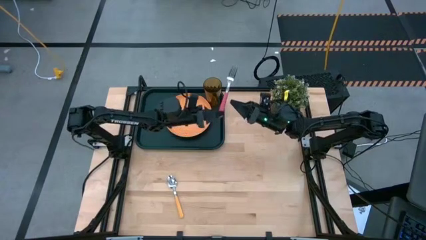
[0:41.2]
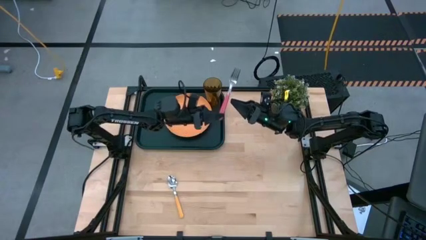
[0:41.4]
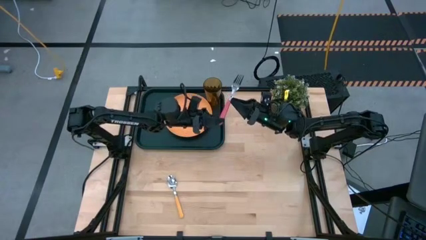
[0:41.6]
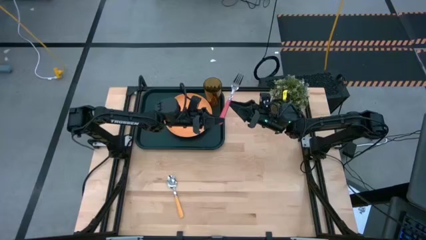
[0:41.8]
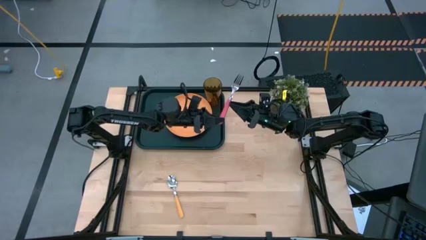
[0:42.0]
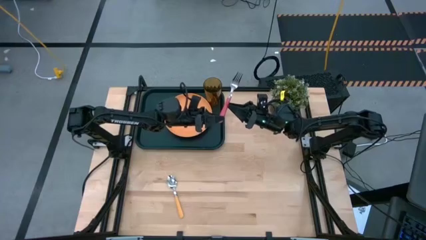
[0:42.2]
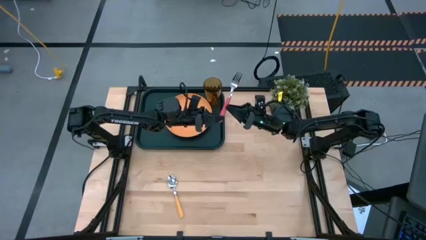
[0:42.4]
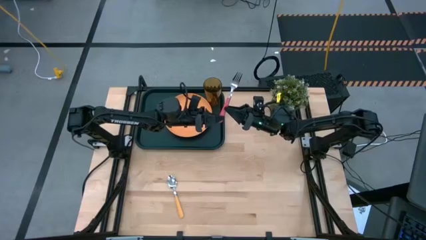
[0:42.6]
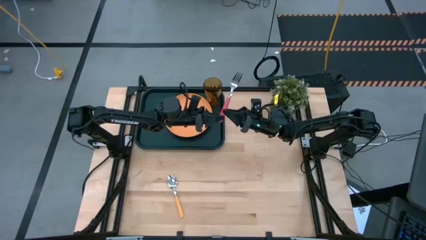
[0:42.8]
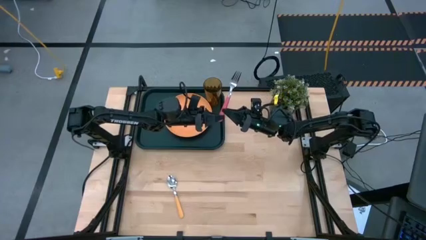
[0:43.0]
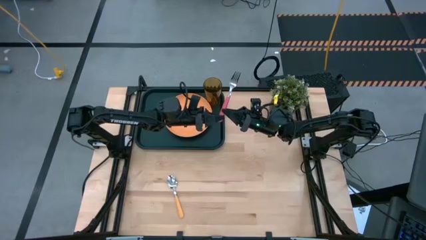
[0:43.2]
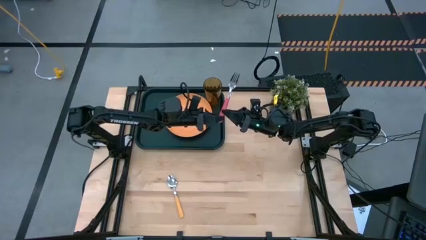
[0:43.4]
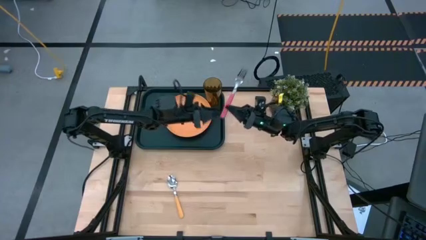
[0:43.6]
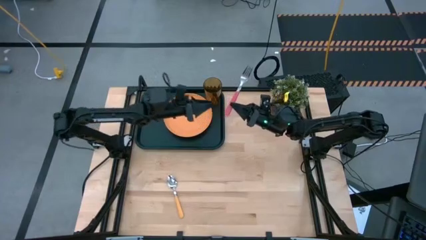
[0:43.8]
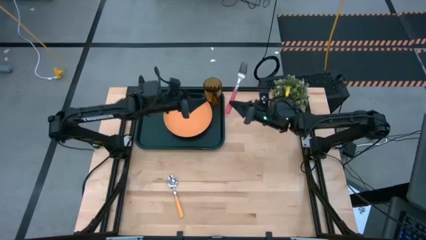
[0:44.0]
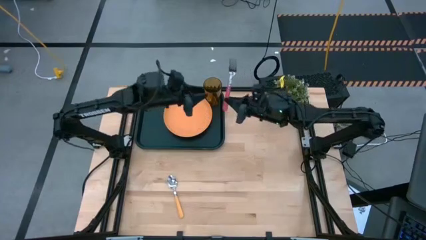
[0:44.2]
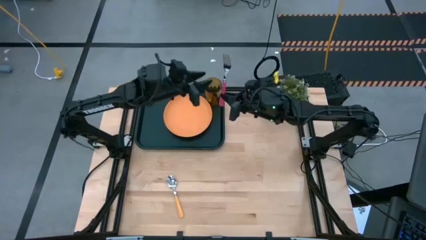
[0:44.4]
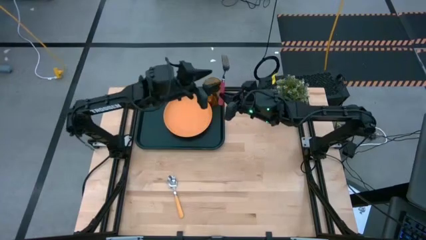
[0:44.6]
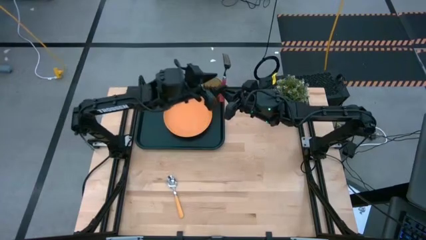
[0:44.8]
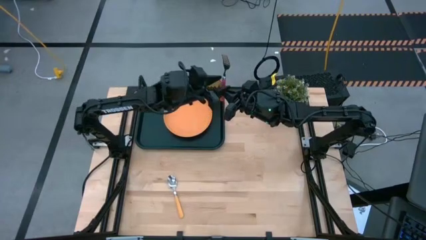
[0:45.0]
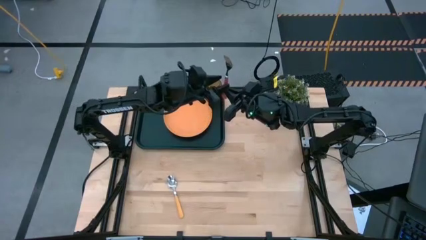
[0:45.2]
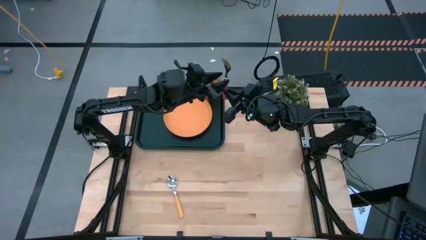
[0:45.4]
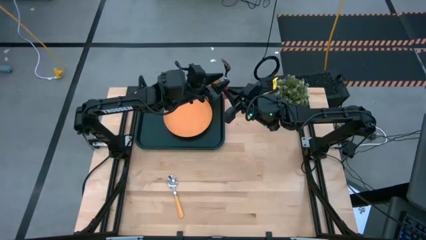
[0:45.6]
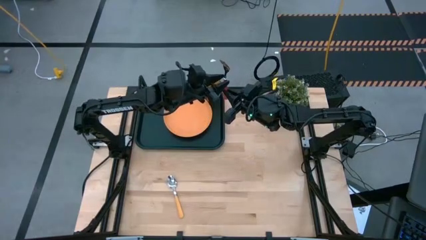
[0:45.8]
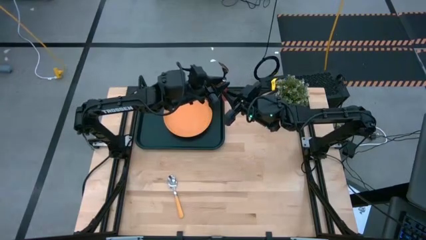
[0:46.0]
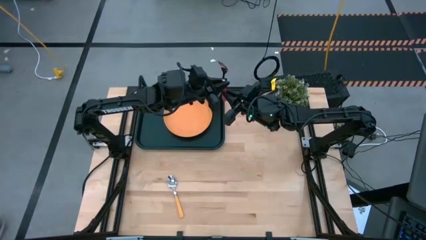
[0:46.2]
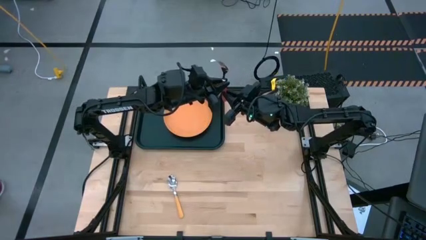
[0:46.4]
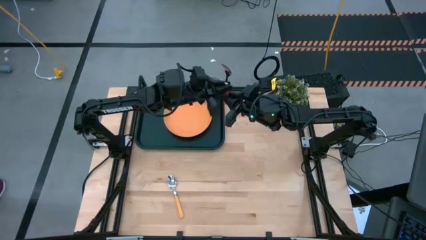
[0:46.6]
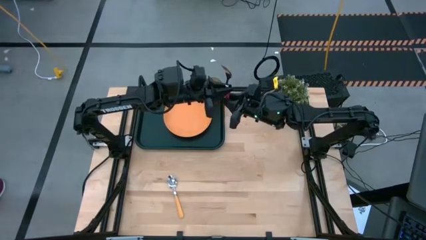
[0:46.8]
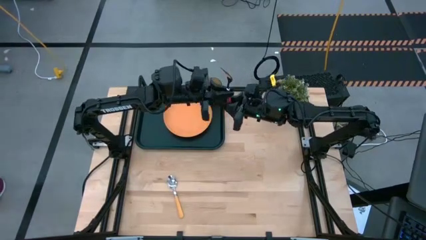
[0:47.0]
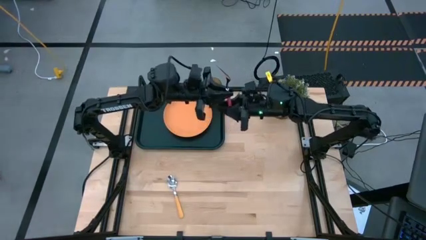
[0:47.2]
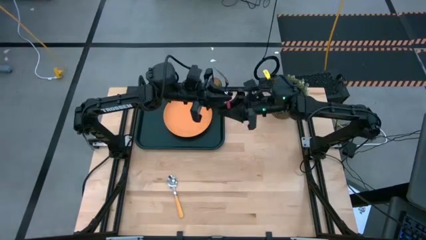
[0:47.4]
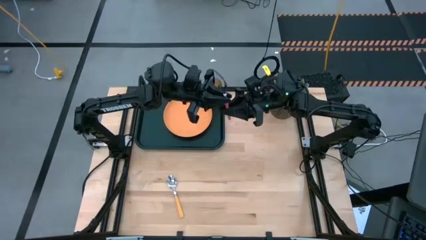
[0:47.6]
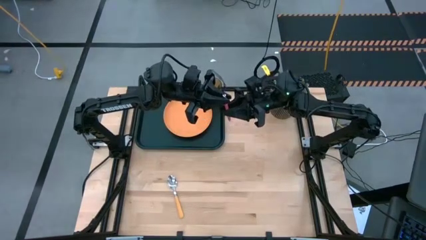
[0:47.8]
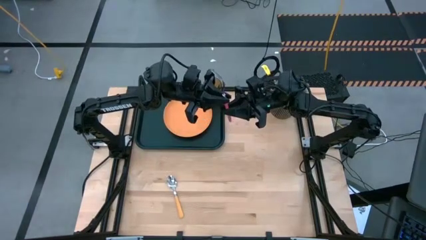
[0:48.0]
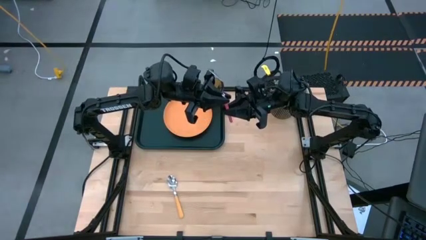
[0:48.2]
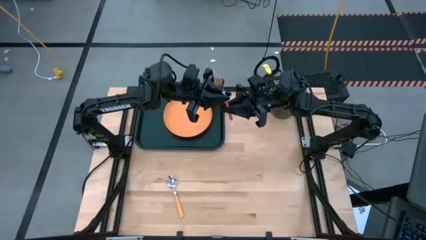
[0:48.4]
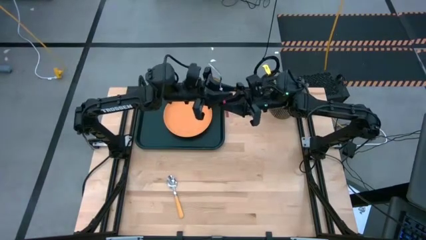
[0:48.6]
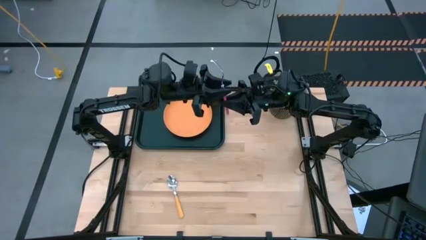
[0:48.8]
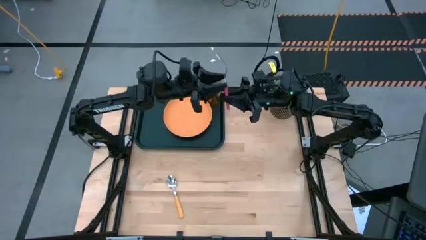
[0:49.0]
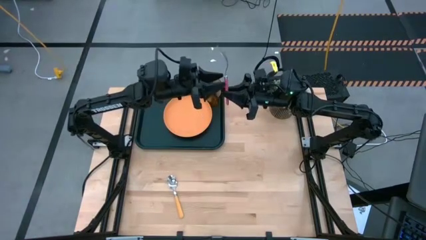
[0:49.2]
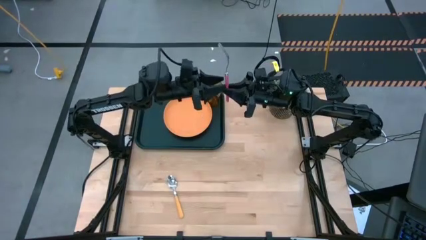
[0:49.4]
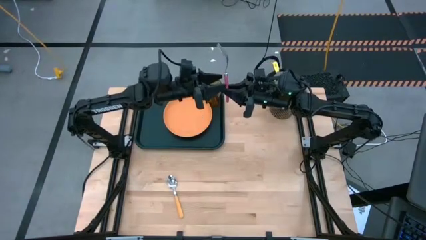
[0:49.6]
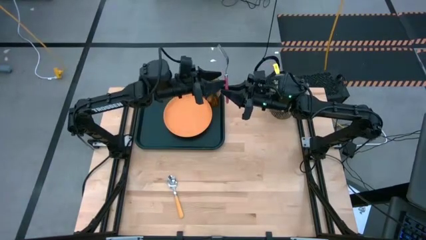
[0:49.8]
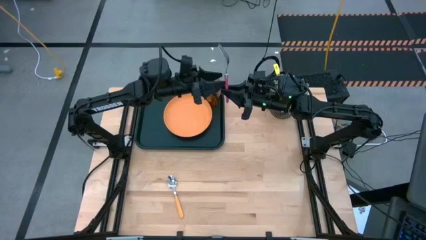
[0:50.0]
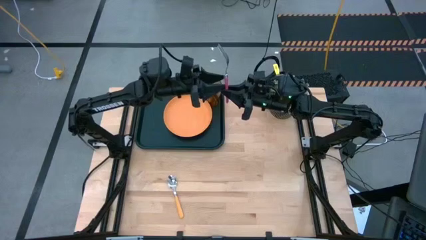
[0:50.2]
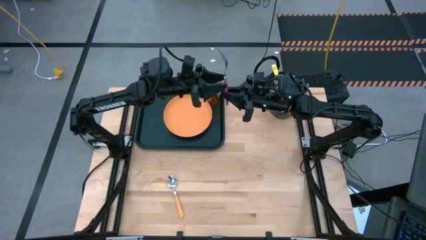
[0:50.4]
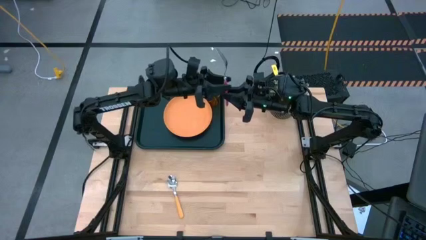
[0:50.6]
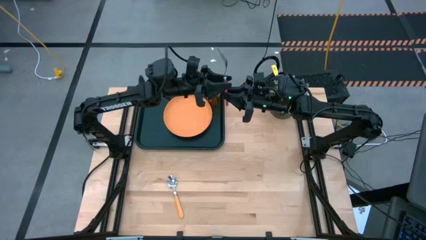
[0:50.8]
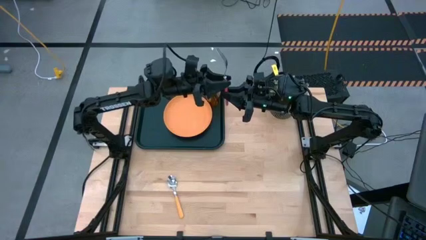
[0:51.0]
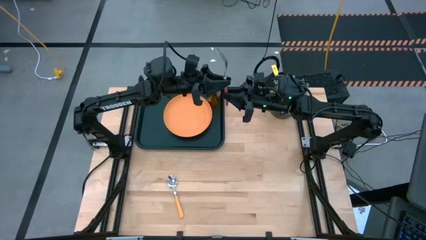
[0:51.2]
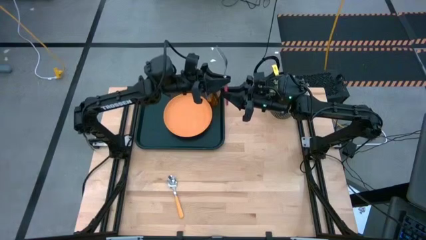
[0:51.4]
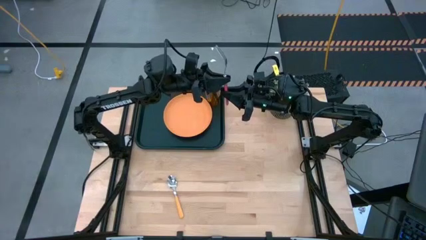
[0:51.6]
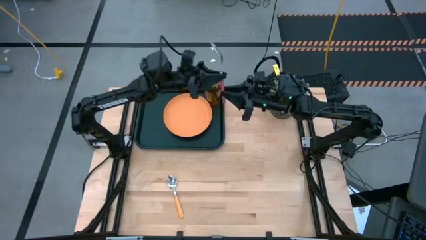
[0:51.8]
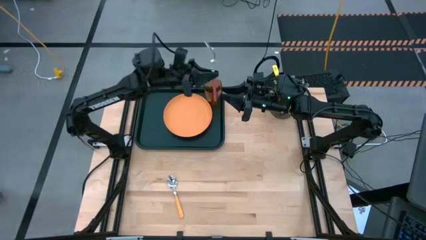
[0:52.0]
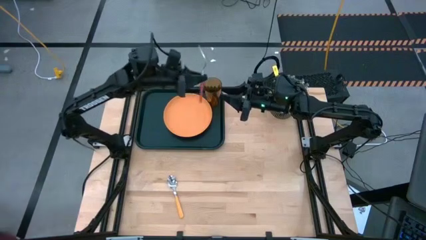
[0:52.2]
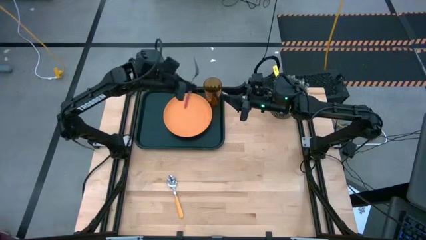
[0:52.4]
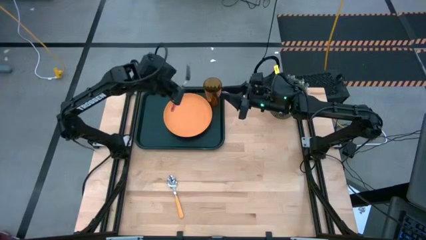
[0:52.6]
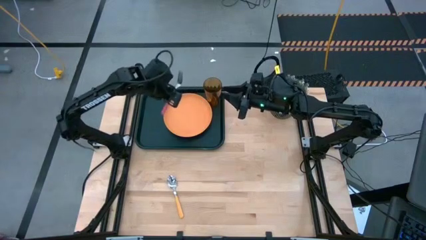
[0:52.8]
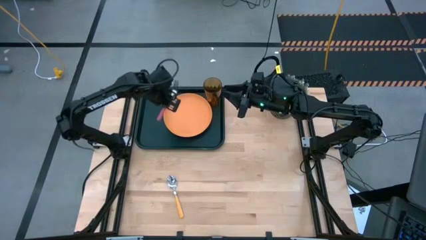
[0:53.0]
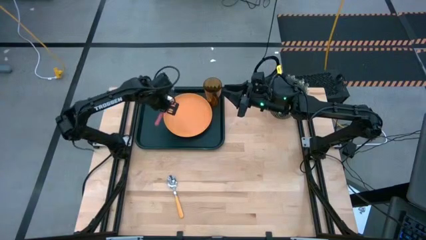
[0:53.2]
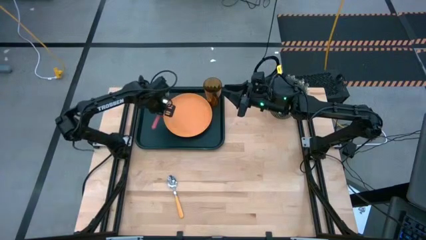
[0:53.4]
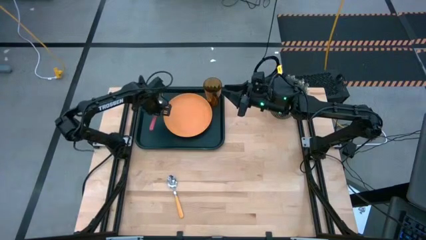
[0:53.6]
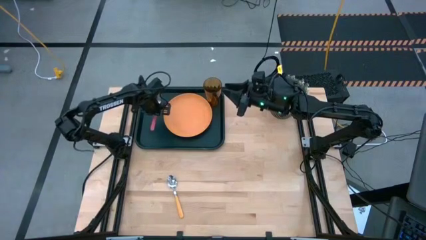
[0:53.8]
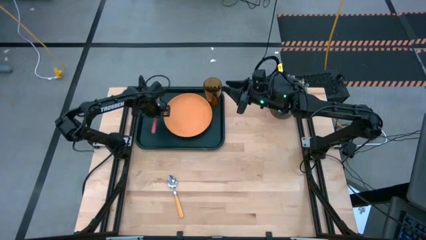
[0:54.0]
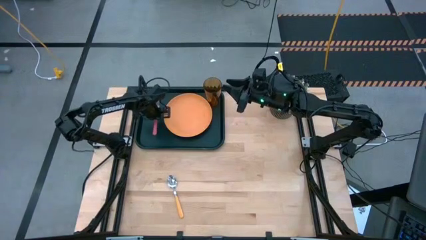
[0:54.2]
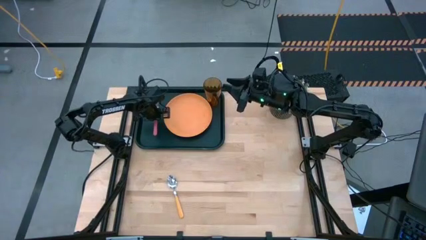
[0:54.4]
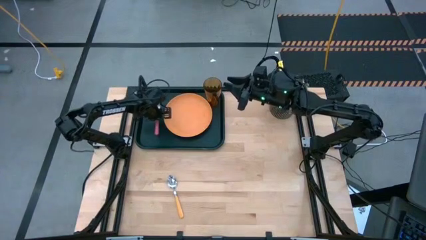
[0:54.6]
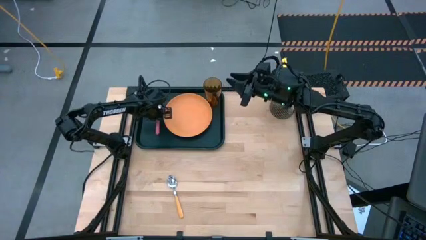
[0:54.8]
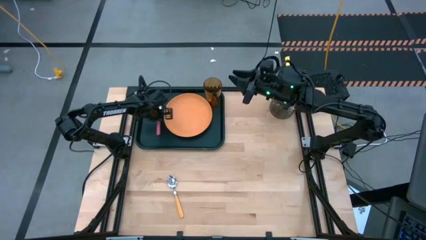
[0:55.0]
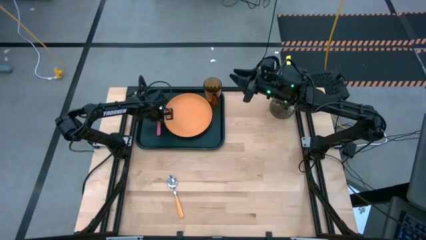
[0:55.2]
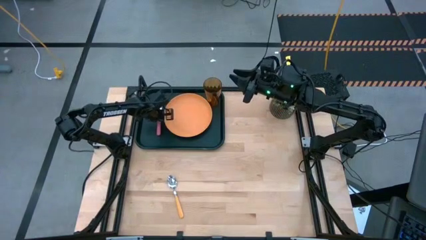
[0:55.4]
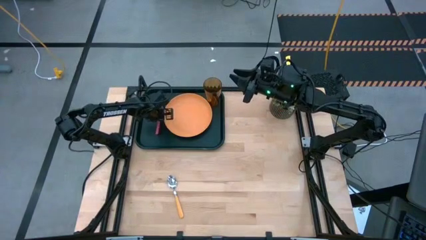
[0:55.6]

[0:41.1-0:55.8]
Task: Pick and place plate/cup/fork/spoon on tray
Put the pink fork on the black serving tray to the left of the orange plate

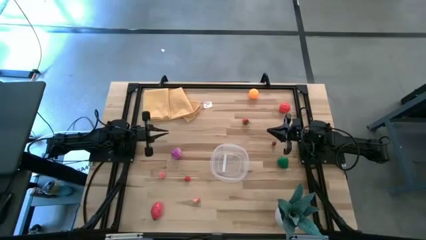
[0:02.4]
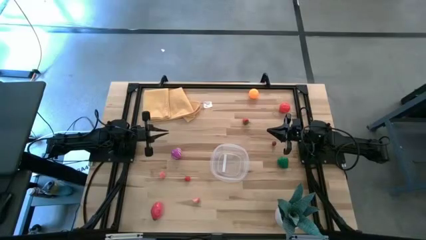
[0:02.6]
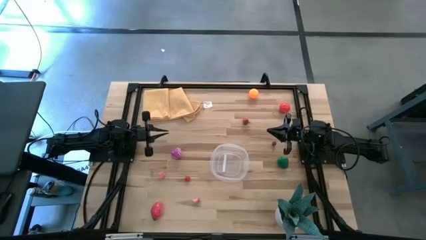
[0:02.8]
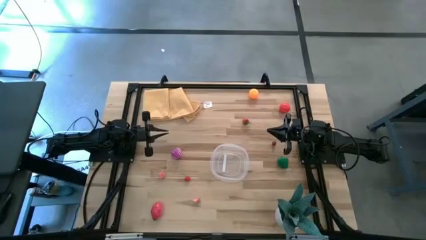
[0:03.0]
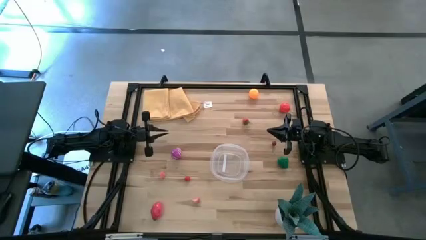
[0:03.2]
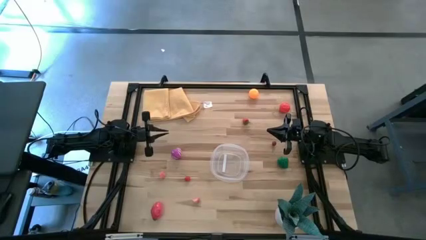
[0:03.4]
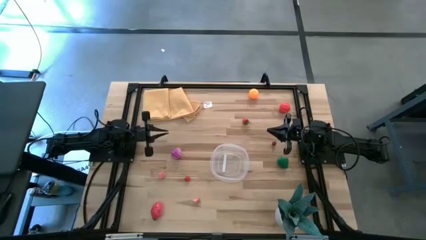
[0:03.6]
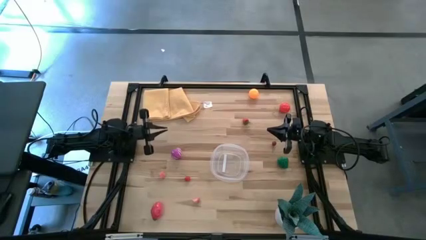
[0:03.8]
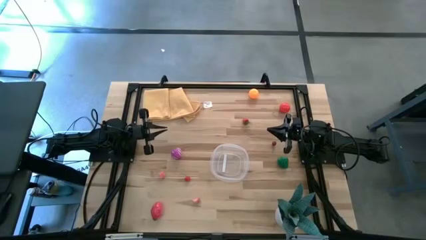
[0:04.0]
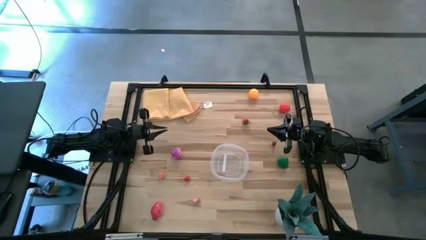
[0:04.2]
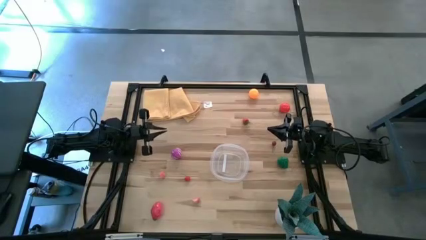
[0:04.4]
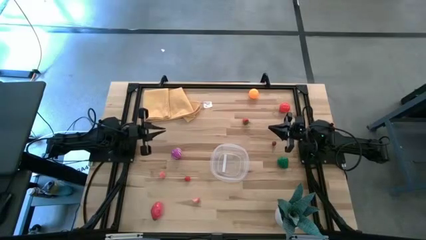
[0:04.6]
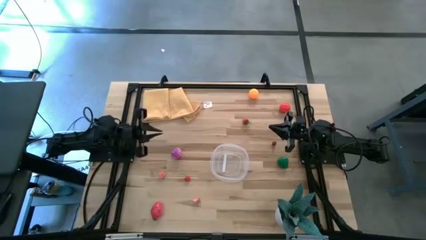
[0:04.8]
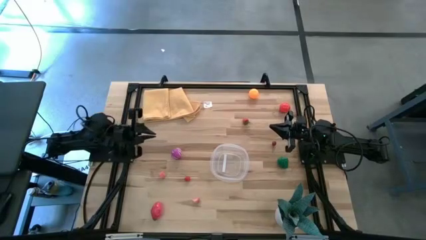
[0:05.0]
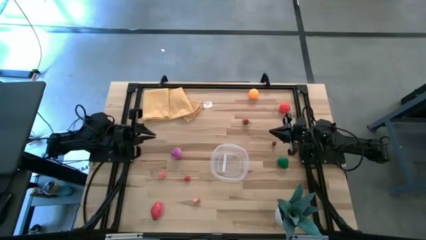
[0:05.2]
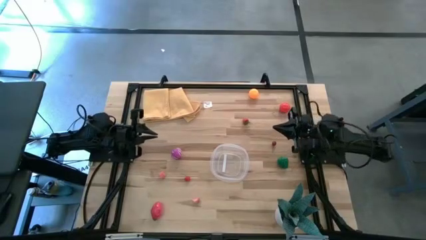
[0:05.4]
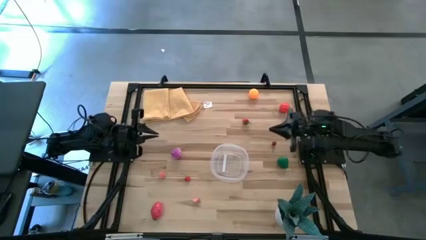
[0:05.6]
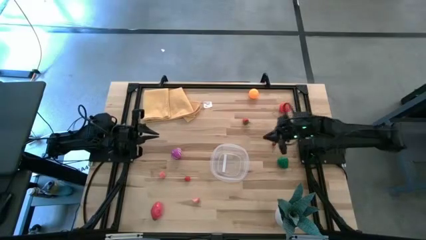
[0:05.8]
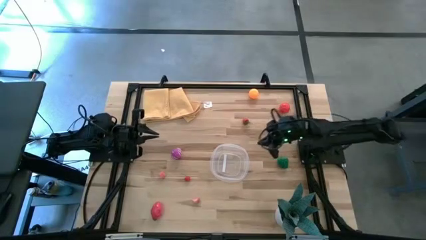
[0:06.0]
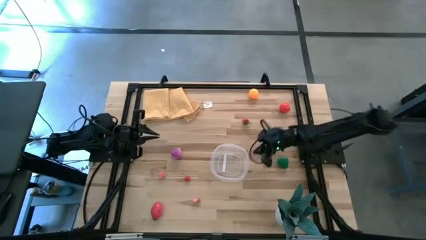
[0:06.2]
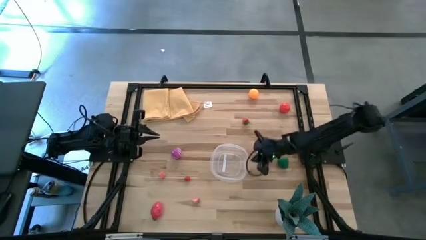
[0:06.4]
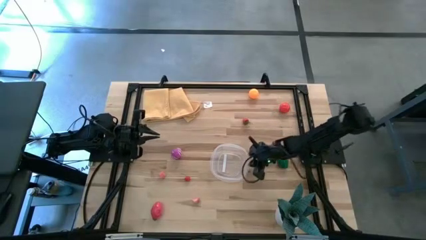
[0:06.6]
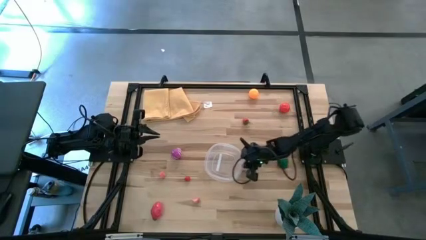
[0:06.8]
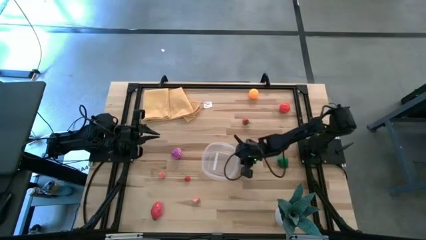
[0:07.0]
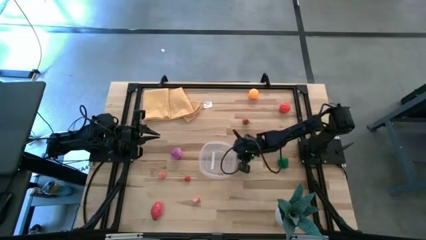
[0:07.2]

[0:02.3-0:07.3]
Task: Pick and placing Produce into tupperware
Prepare the transparent bin
